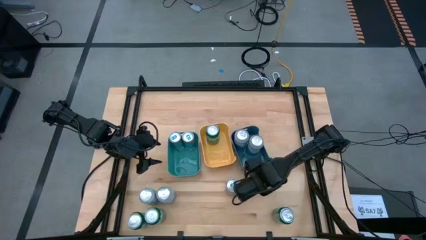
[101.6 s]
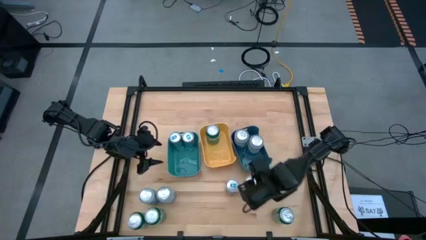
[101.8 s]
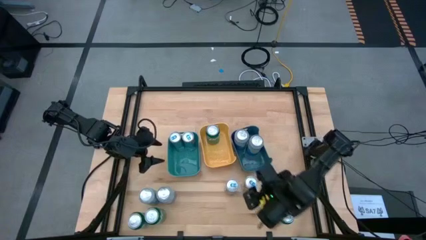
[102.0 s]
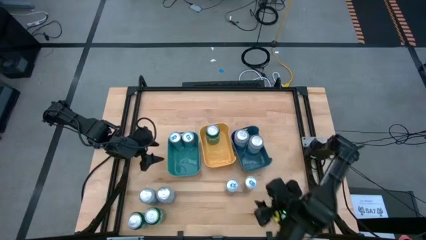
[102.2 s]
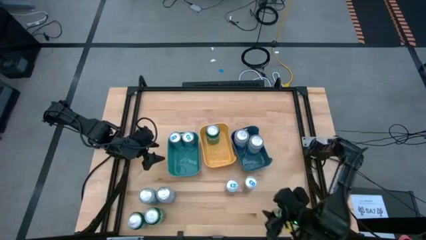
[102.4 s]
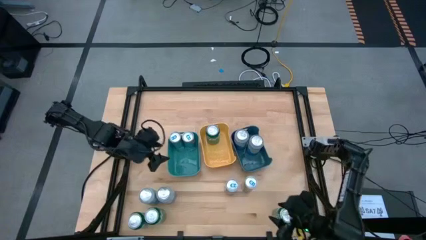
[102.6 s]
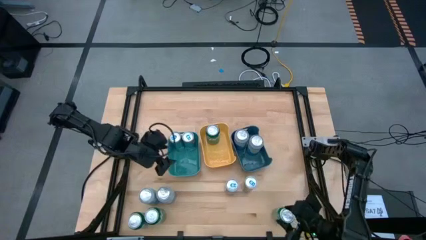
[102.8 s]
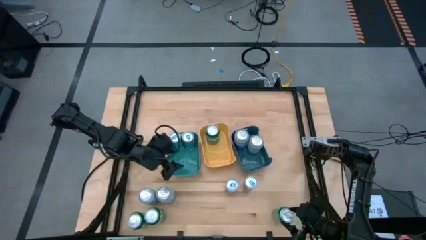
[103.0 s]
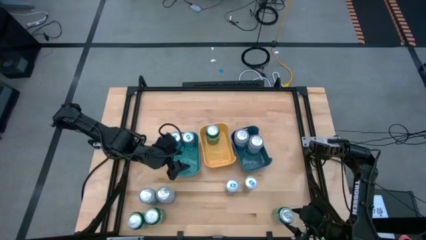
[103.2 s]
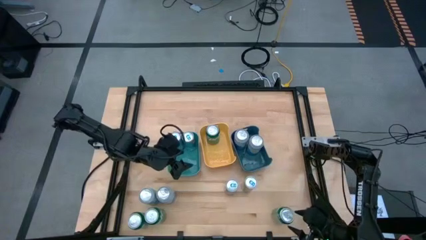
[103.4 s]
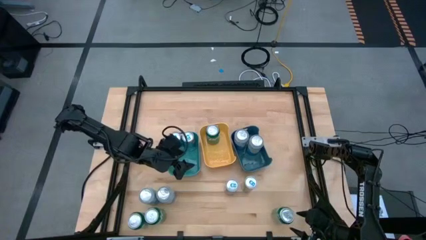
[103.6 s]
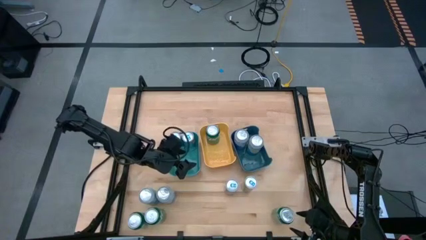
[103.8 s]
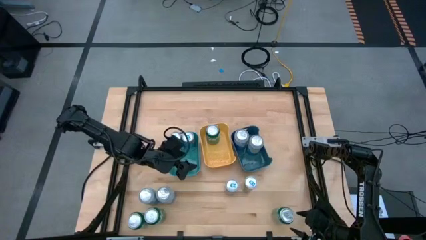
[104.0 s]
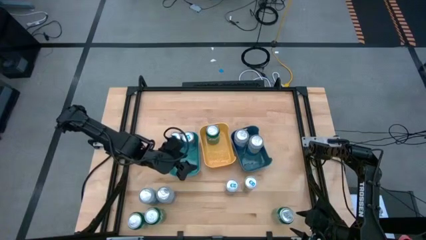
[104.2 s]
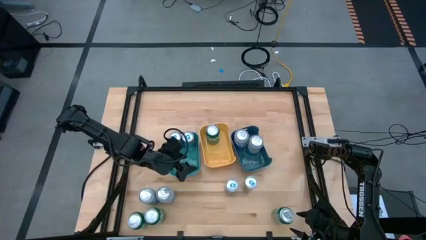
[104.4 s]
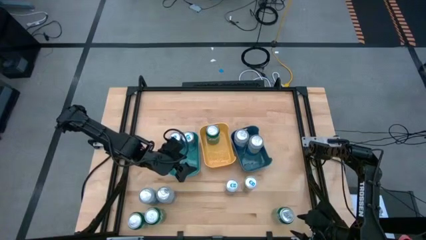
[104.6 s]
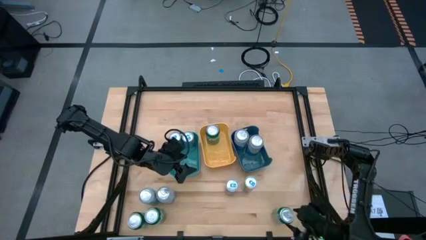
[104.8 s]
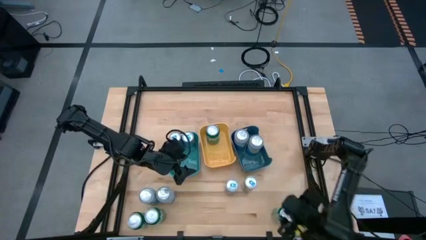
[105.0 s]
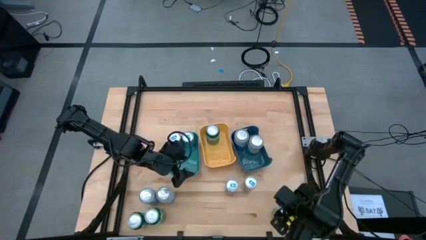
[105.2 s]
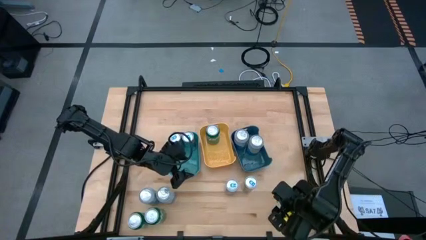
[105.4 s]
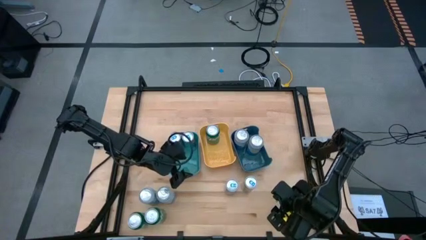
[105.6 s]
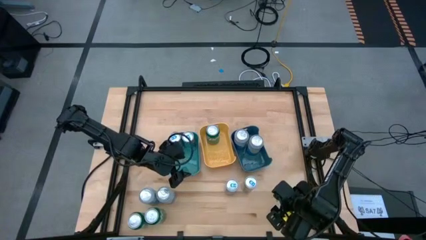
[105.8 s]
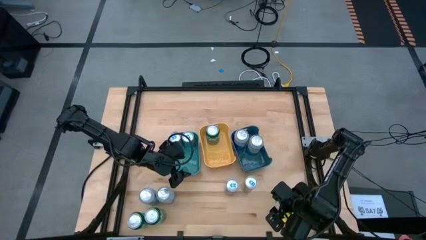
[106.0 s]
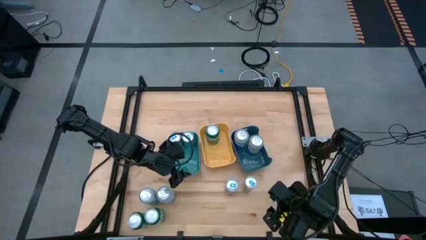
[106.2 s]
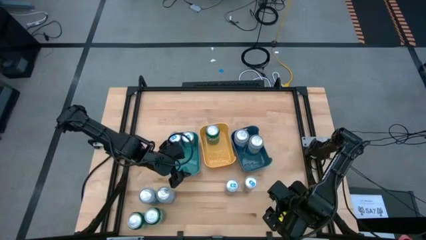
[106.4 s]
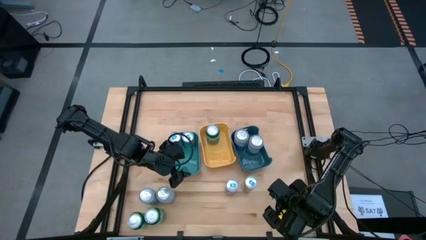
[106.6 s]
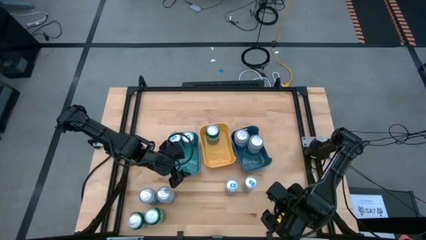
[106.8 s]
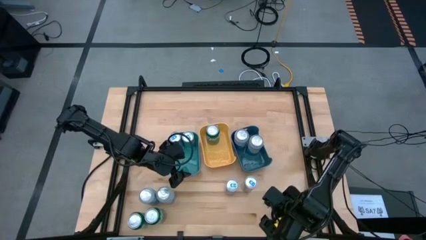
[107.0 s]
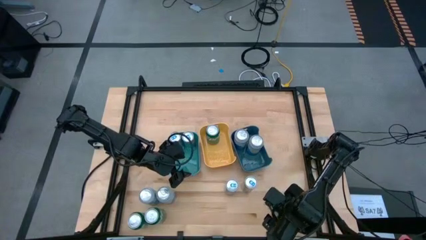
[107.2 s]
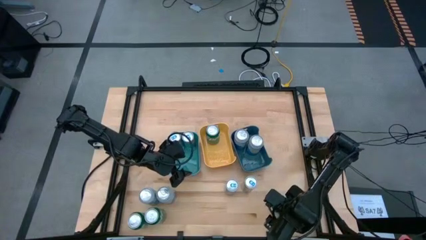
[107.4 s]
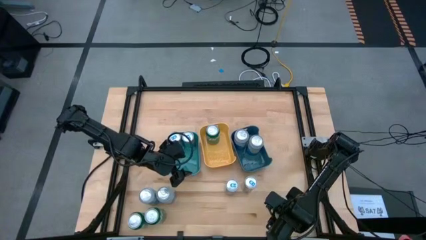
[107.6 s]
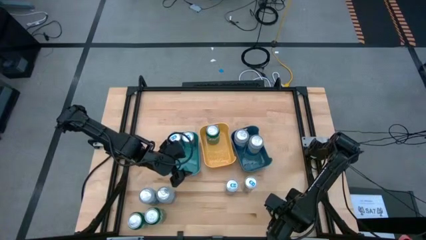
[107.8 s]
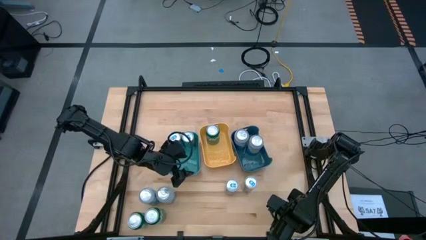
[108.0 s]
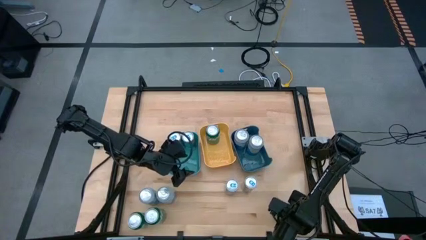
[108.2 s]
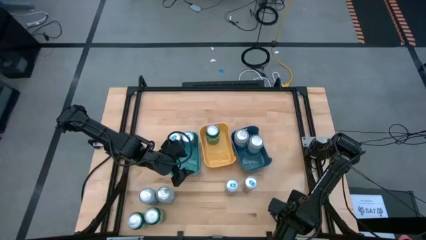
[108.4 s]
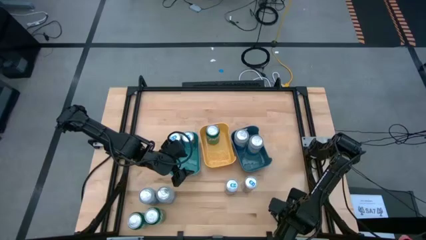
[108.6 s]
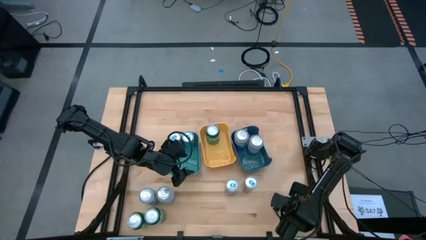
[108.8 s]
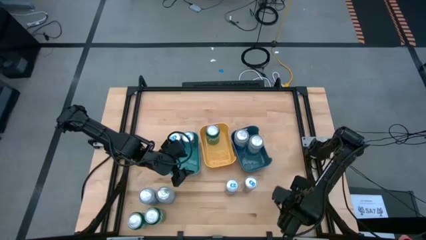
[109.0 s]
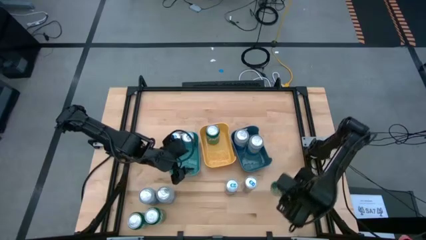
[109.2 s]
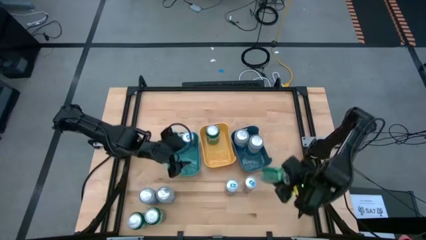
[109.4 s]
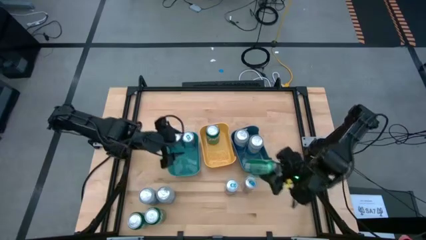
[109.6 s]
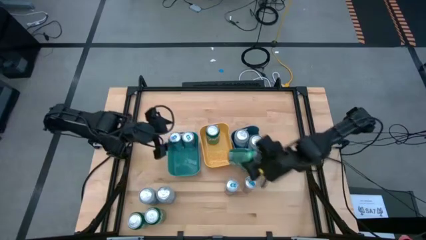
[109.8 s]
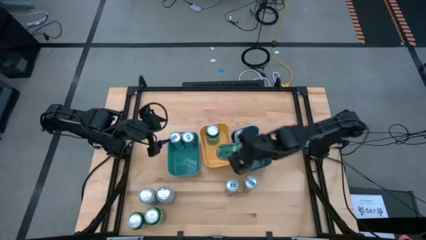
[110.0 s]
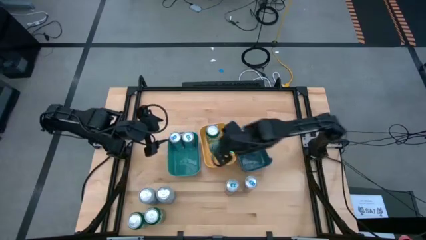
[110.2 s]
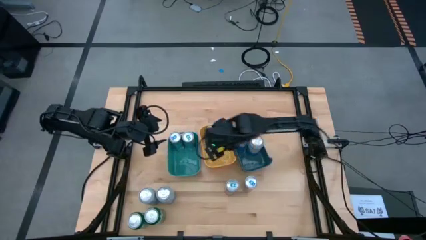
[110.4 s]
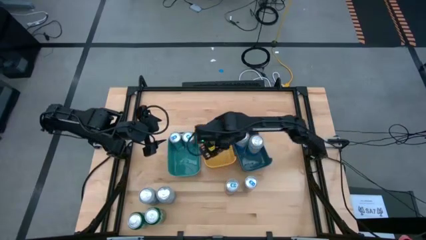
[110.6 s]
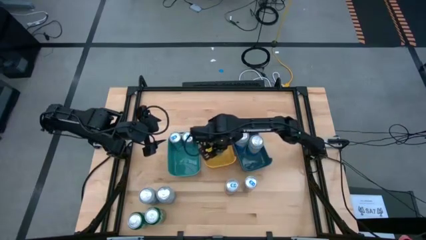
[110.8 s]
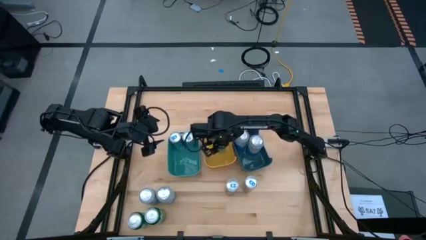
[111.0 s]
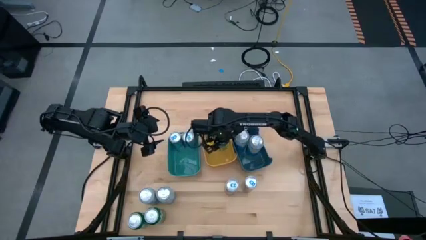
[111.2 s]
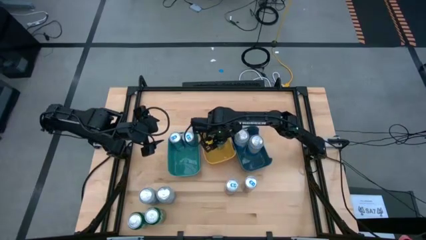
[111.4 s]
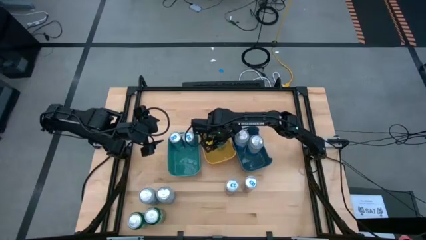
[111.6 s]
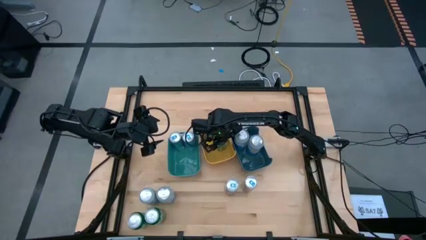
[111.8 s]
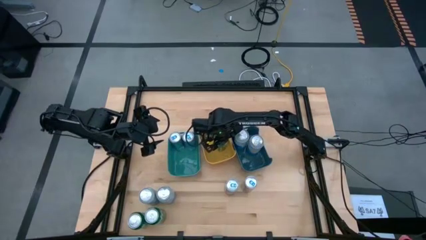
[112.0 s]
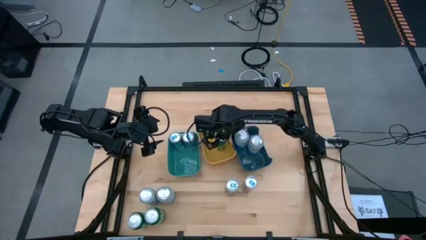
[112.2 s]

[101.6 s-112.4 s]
Task: Sort soda cans
Put the green soda can into the yellow bin

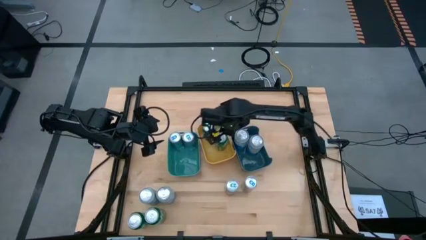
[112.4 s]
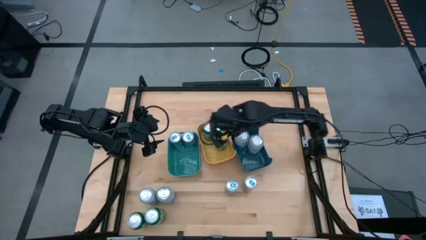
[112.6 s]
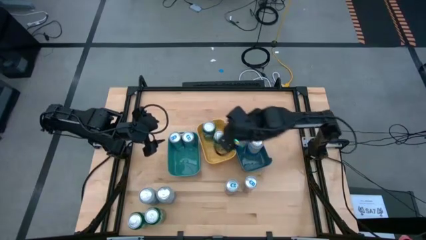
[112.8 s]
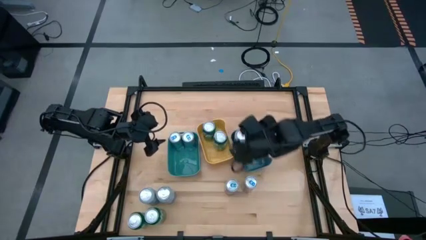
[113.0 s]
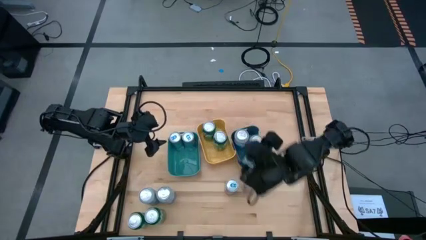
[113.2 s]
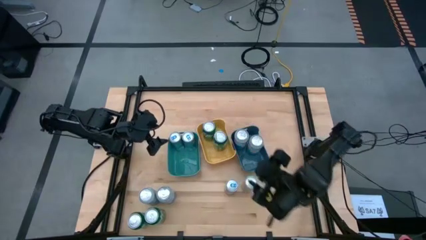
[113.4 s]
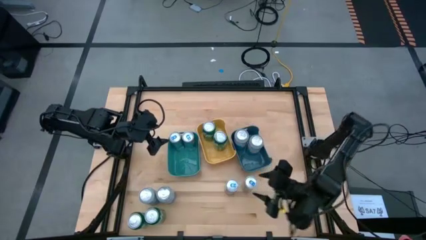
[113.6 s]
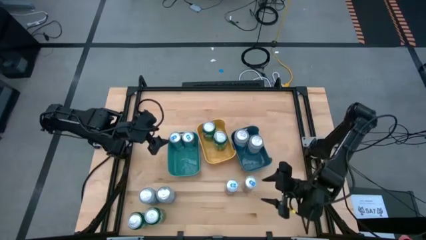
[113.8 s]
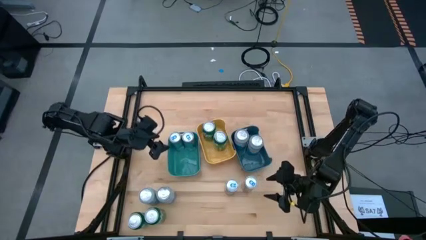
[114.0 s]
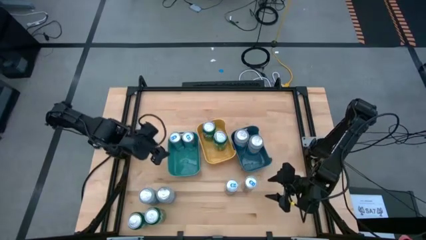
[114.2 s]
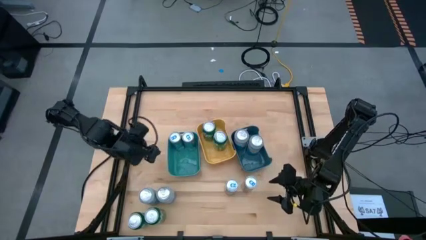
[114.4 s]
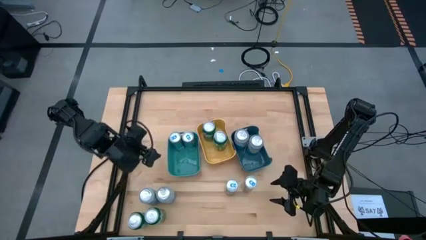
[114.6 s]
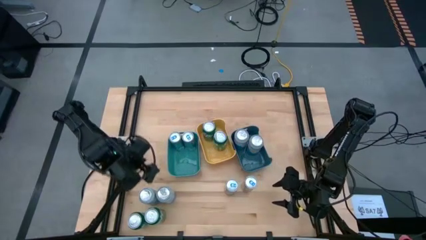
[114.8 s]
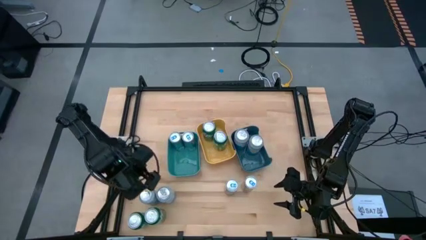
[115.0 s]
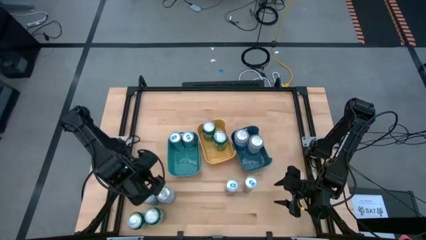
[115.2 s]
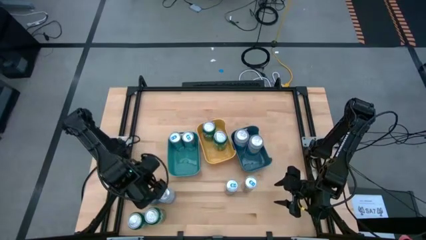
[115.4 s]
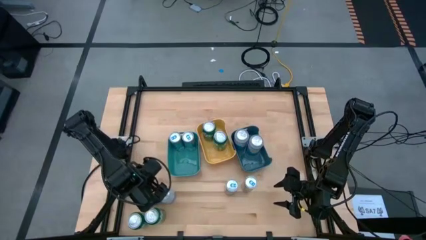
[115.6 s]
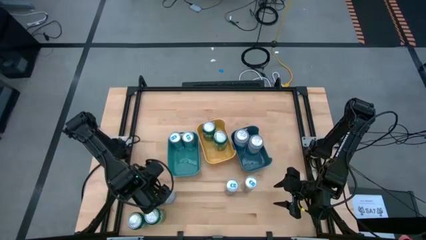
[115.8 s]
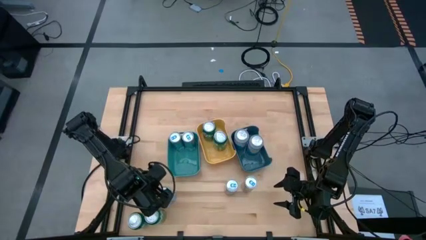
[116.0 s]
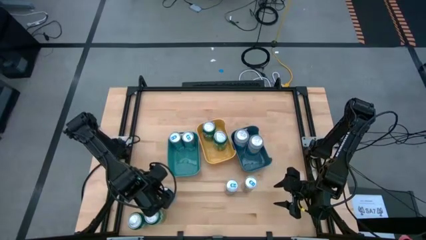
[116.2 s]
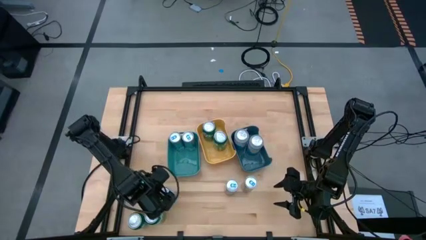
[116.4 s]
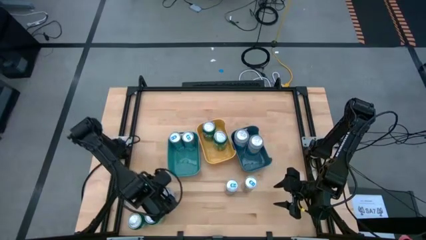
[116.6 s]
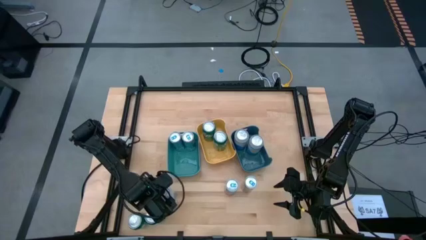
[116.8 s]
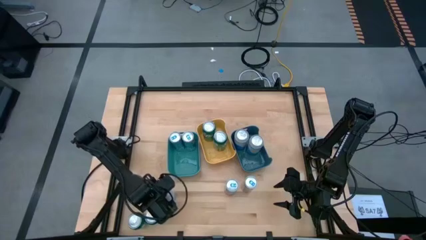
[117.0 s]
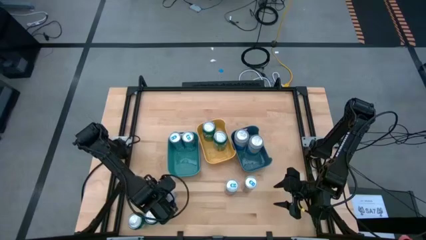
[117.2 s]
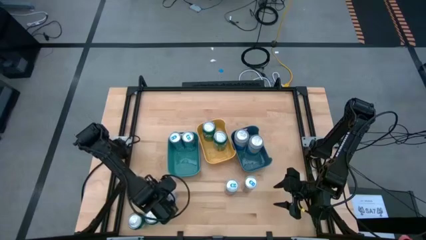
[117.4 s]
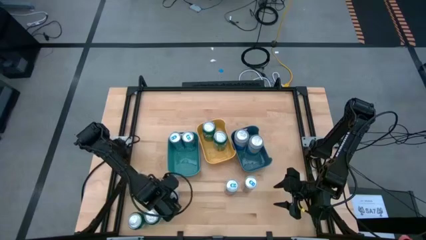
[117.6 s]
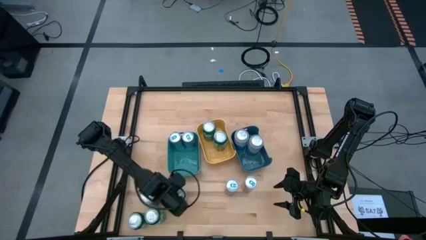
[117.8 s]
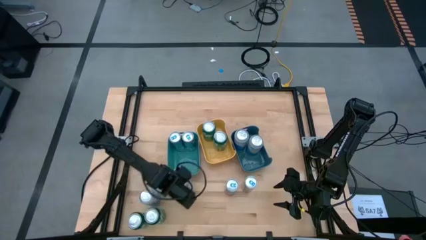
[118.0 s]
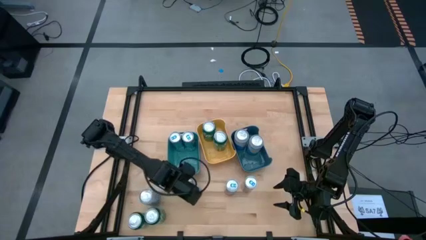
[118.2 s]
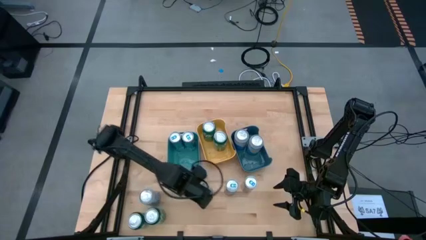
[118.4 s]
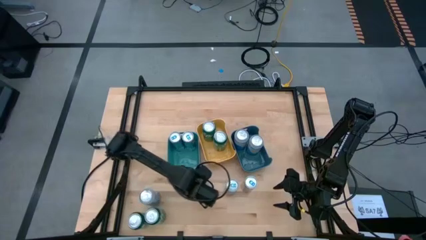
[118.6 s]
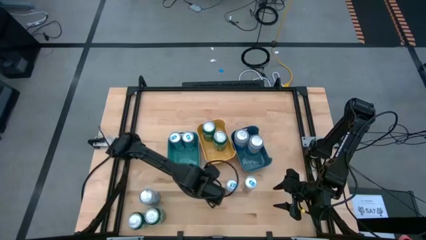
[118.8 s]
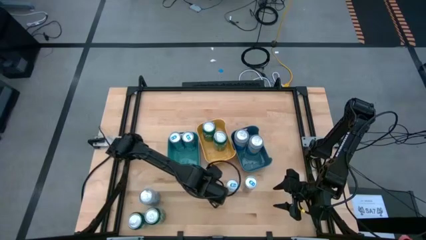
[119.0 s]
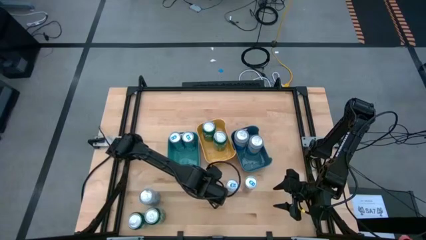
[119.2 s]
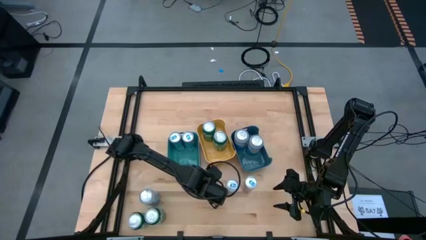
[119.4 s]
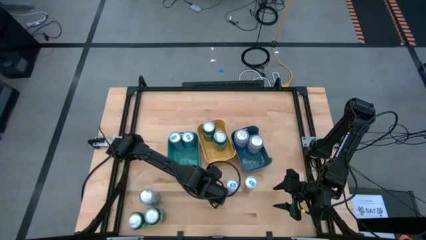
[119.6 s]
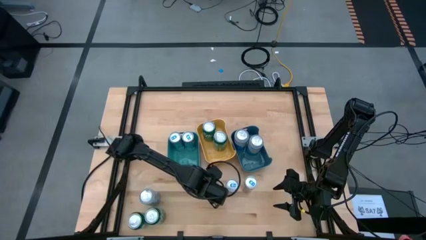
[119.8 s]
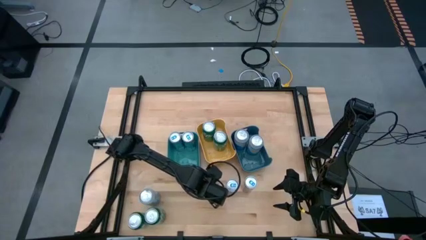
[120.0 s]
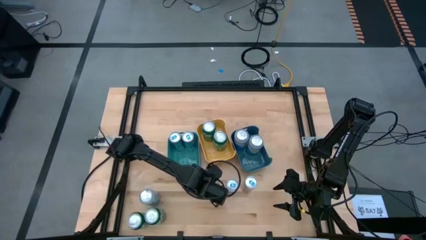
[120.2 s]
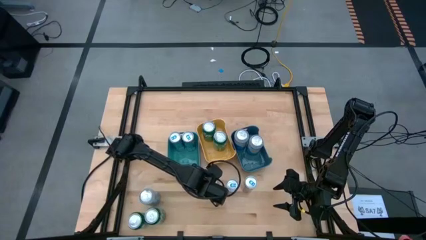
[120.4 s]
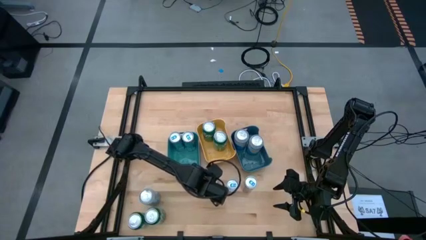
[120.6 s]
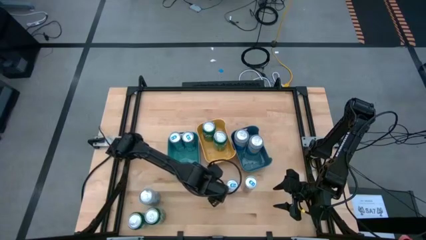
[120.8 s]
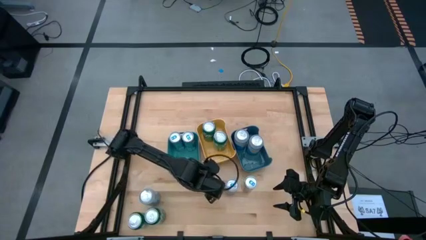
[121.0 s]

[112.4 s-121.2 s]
Move the blue and white soda can to the center
